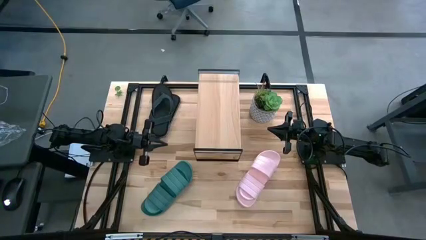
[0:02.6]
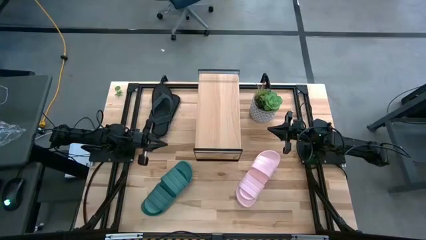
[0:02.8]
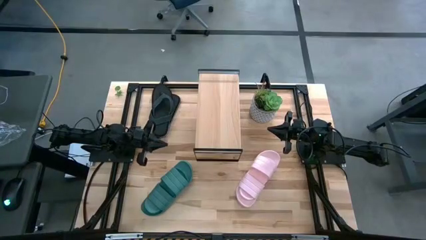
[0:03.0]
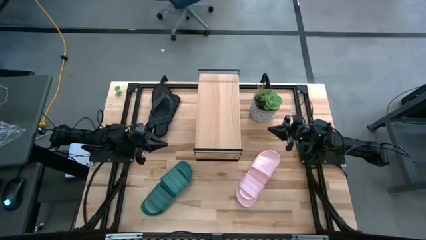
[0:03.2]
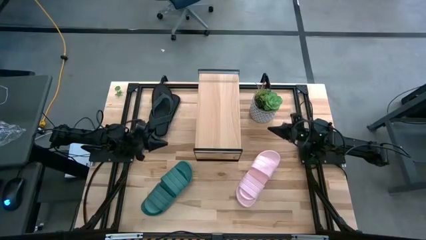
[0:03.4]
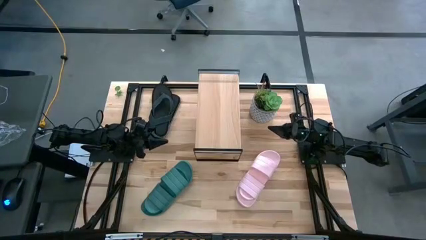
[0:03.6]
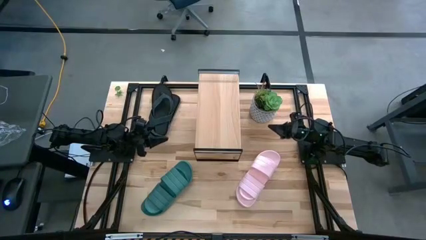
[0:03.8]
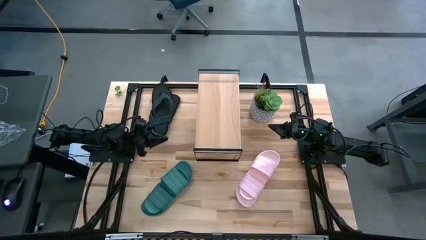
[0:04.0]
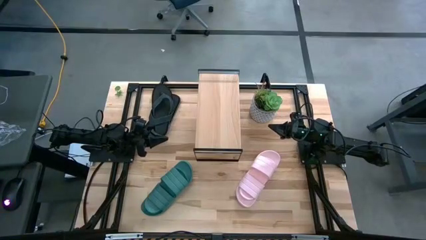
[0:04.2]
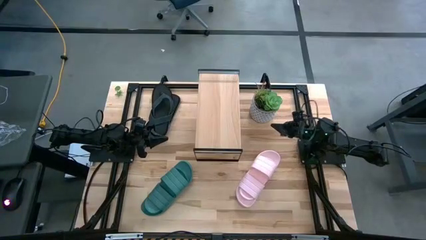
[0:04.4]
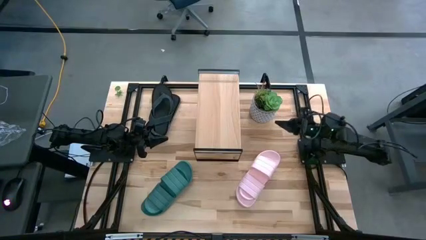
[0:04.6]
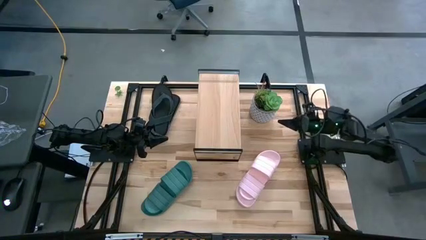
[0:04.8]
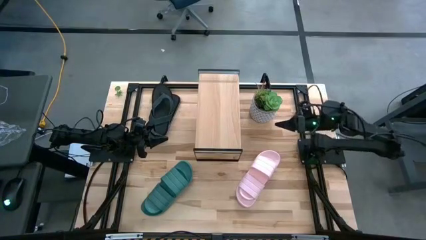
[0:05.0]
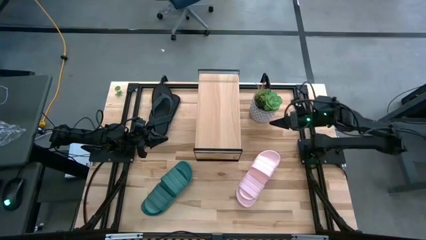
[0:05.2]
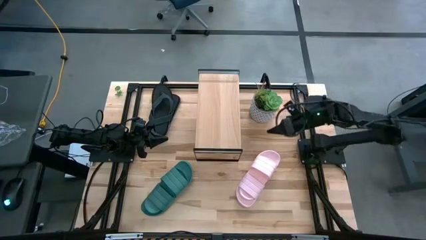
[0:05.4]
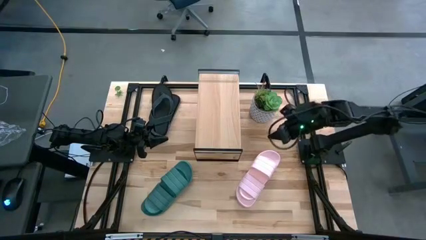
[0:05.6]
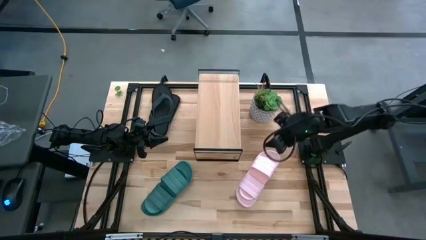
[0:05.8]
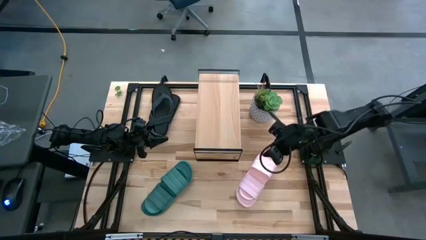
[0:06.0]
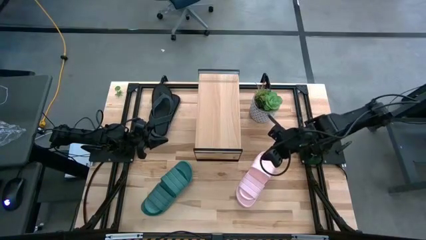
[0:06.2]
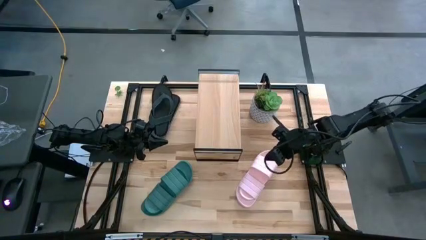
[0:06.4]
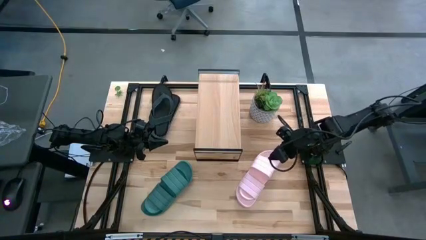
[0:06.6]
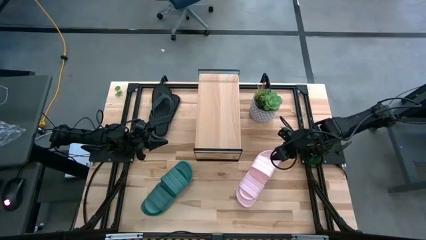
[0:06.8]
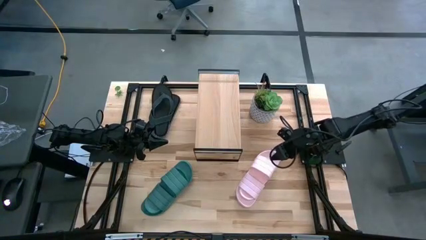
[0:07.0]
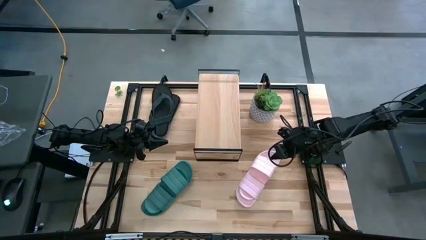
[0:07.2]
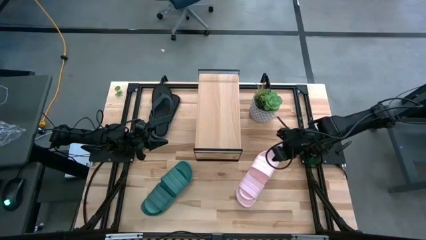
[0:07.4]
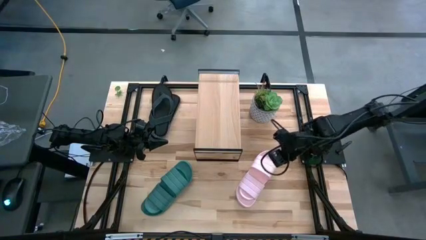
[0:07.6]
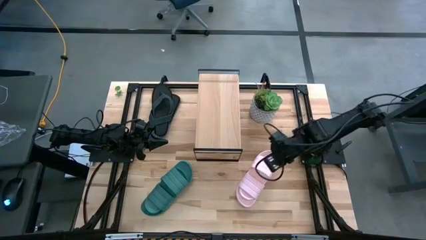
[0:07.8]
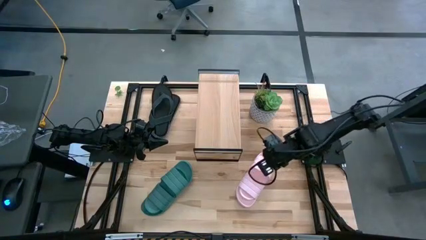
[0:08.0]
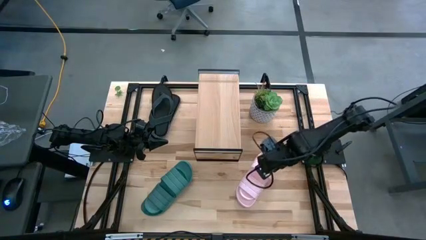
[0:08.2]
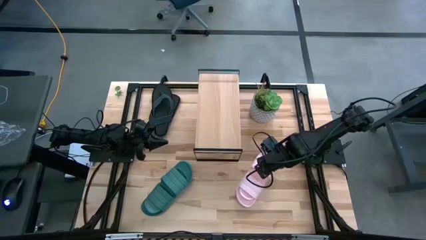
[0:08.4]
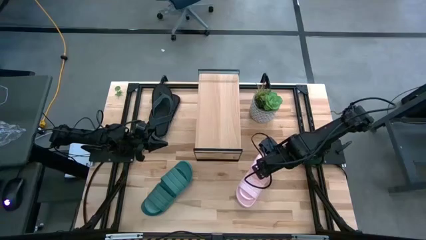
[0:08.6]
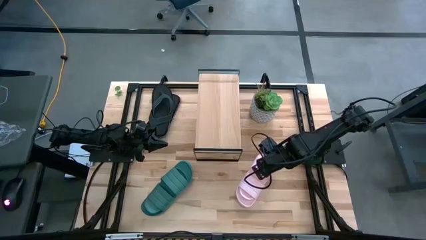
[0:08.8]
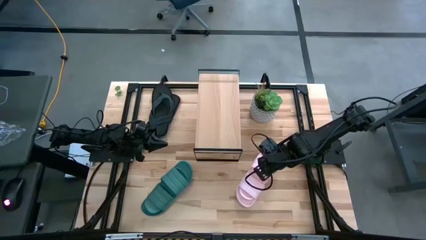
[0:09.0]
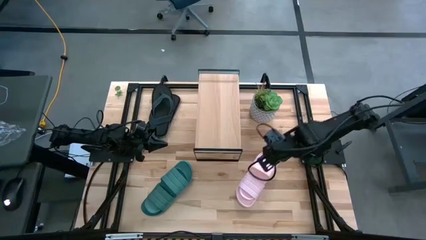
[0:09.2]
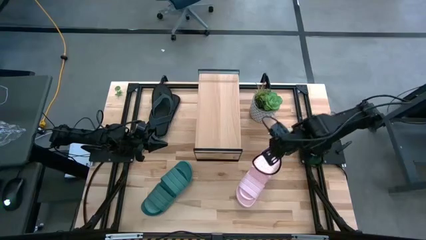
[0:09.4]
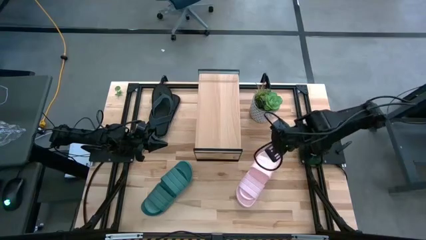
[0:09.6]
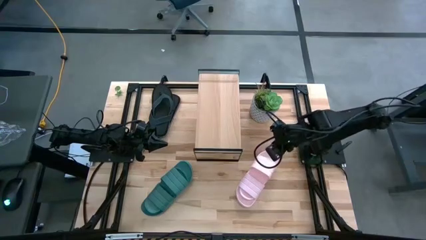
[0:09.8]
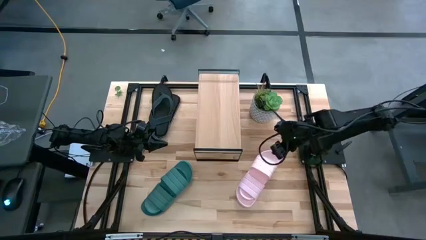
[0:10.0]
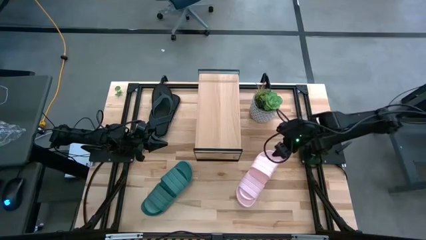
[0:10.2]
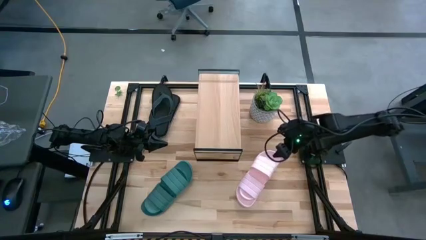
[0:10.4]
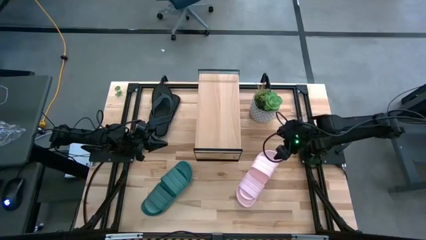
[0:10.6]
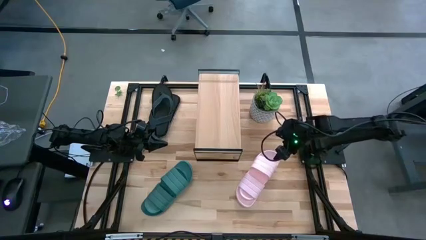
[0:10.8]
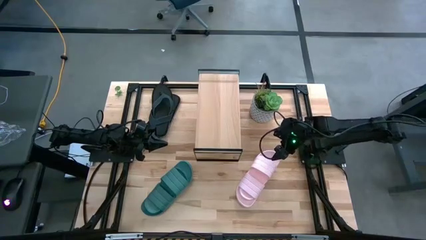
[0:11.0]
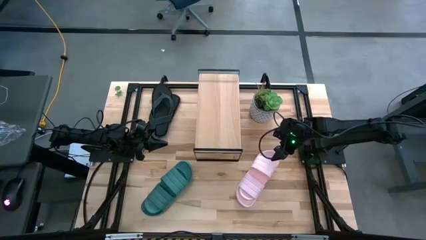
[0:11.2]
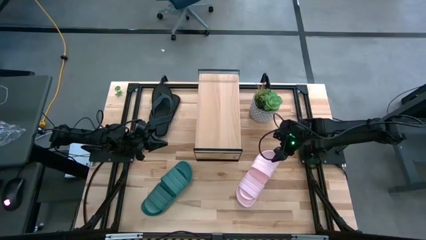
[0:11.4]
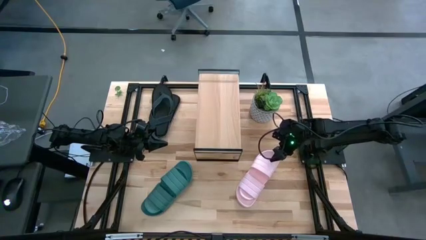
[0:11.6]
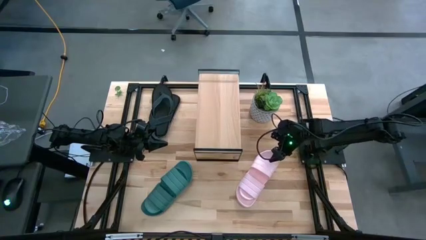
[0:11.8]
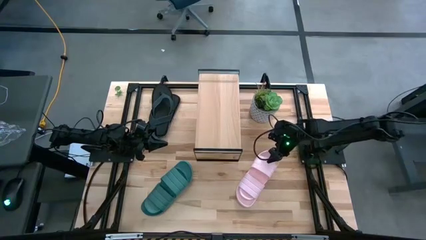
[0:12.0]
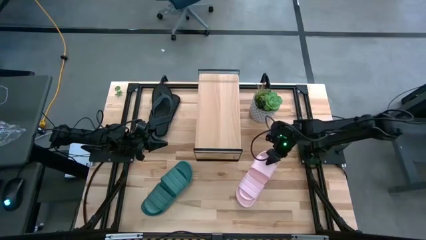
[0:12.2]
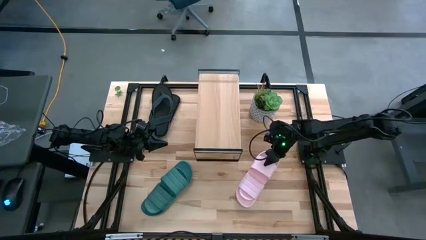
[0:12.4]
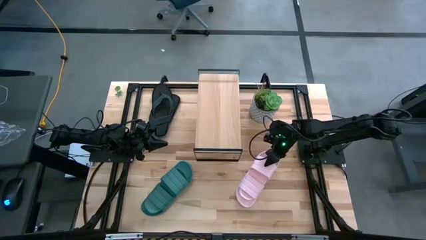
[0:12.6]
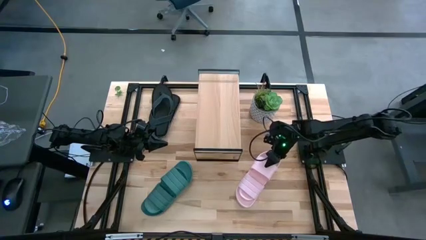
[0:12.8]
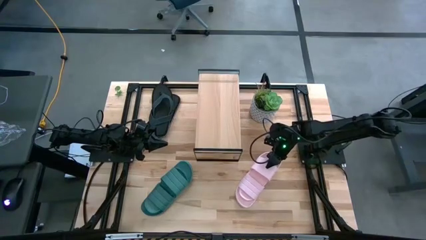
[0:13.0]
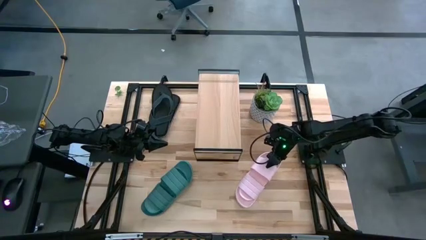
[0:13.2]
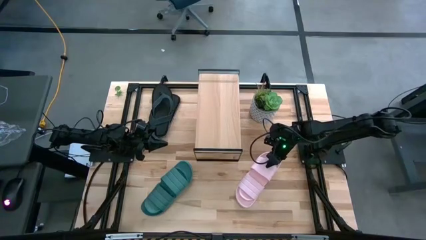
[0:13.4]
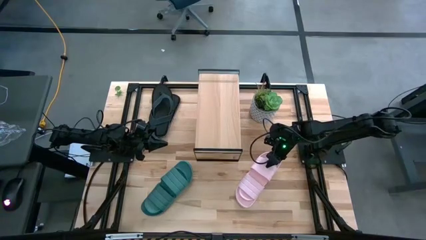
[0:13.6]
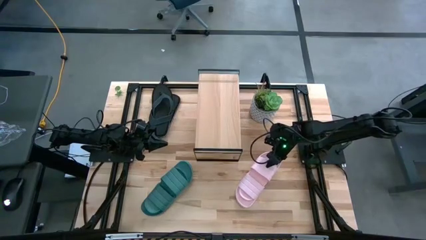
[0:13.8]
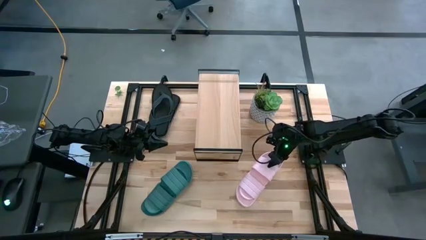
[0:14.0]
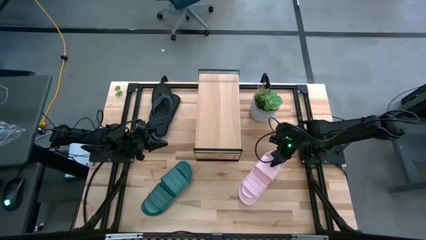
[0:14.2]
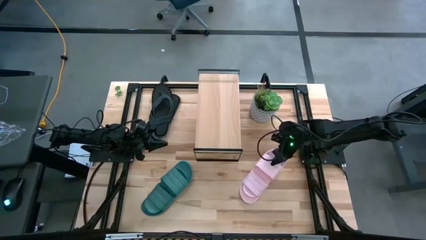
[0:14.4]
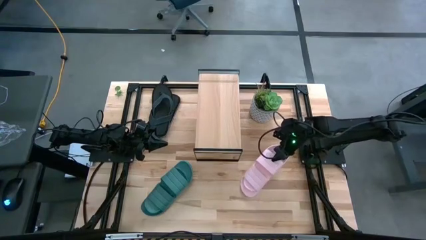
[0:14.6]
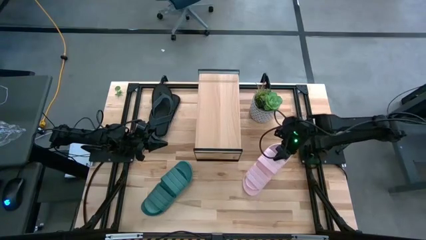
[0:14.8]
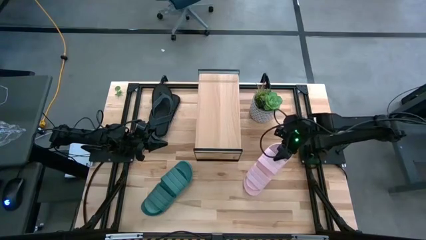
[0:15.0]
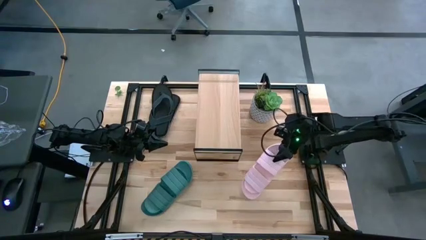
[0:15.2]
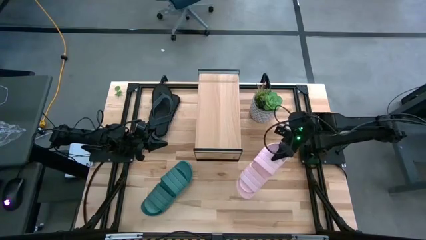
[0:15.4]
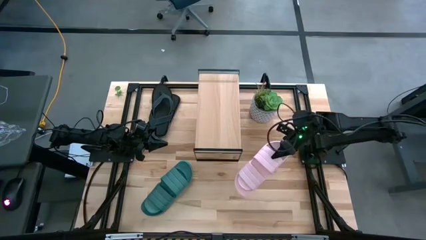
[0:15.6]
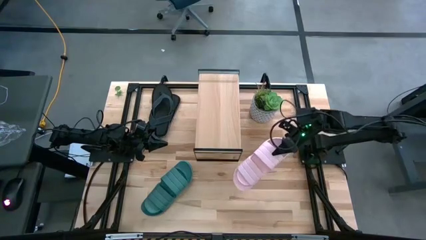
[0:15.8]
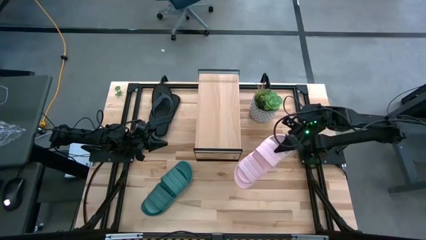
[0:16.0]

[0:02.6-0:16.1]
Task: Pick and place slippers onto the shelf
Put the pink pair of slippers on the shelf
